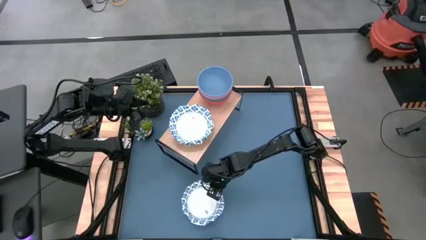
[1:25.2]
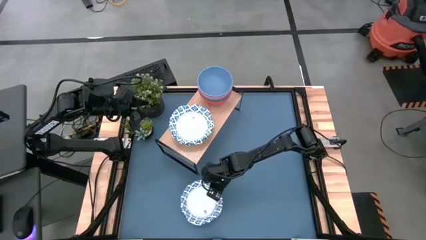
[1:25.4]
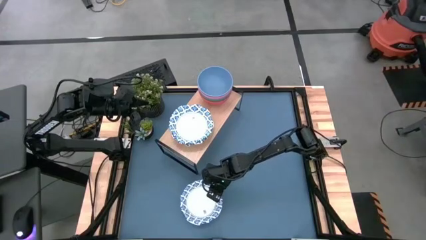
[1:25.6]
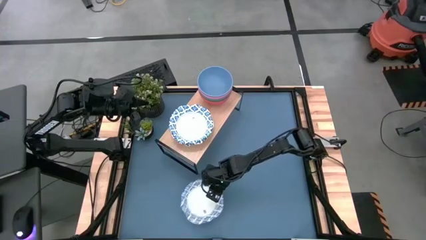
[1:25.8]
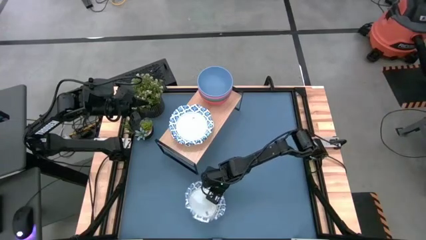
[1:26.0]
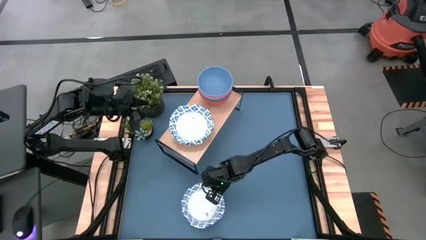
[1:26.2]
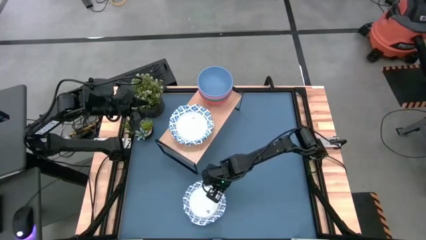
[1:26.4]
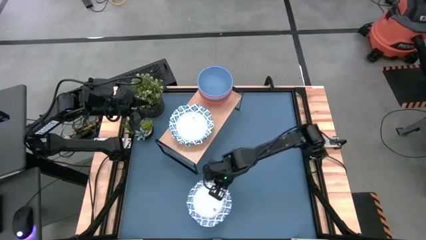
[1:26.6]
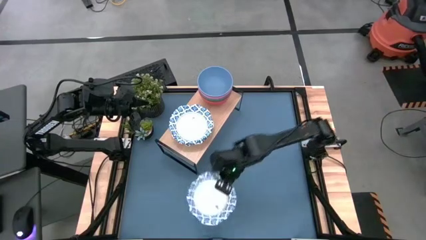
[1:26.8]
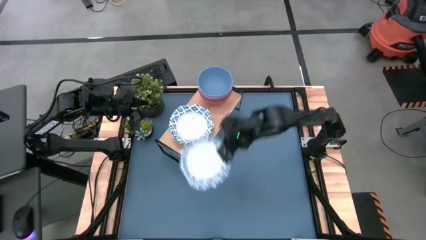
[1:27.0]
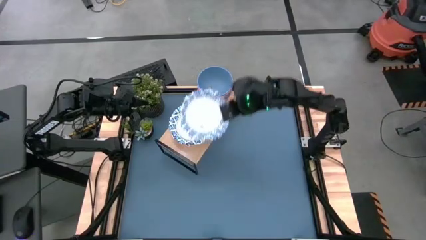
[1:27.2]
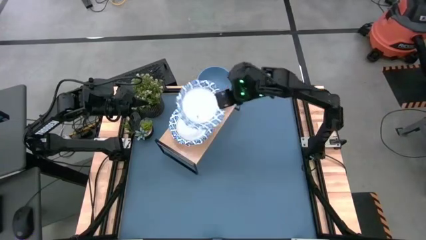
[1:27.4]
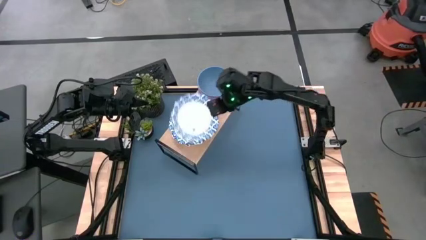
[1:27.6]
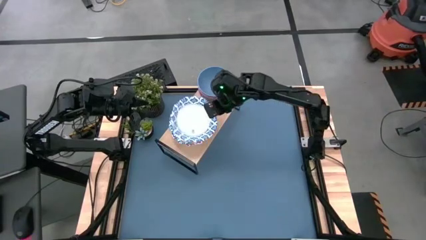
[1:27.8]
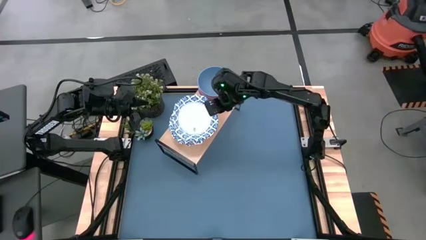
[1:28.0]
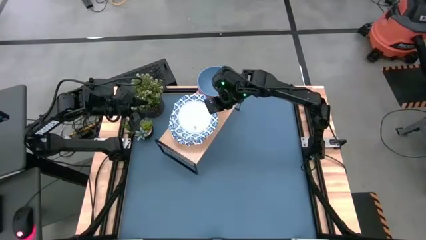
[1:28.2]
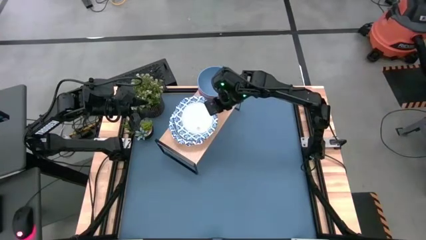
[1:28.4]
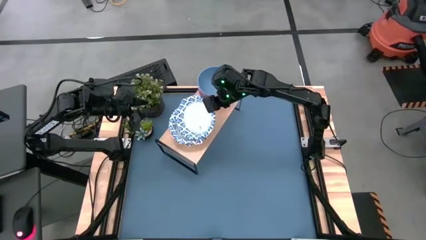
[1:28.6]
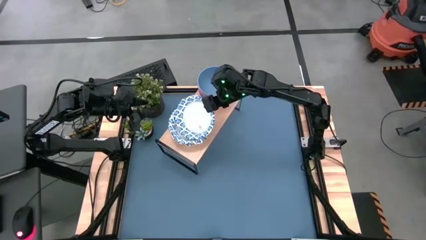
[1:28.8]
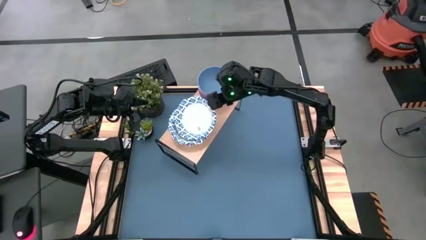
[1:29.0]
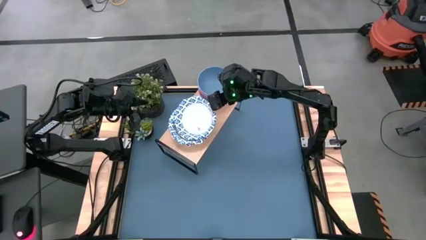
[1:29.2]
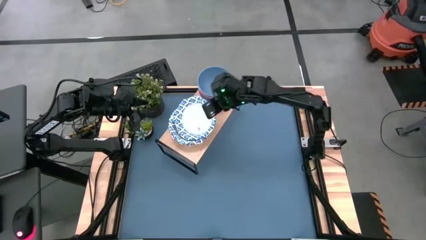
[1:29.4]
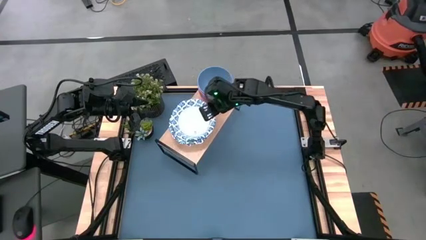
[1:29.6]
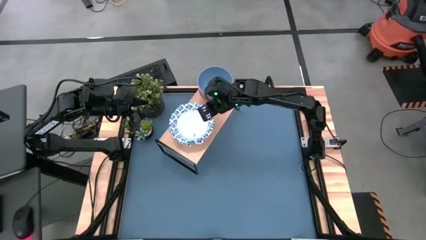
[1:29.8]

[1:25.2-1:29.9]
Task: Place and stack bowls onto a shelf
Stack the white bowl on top of the other white bowl on the shelf

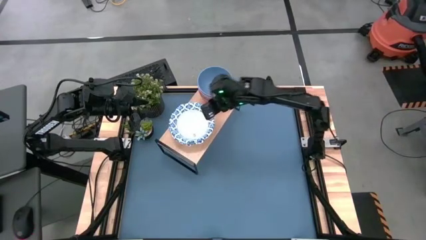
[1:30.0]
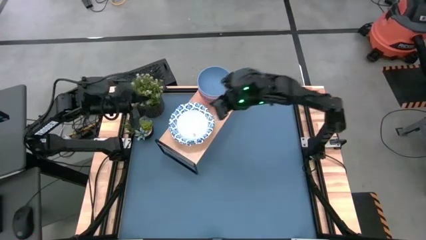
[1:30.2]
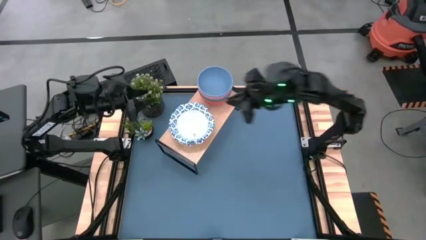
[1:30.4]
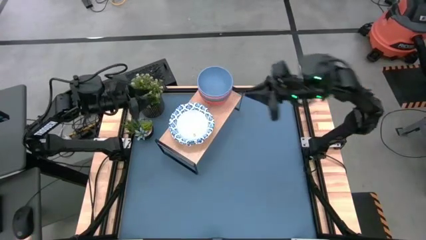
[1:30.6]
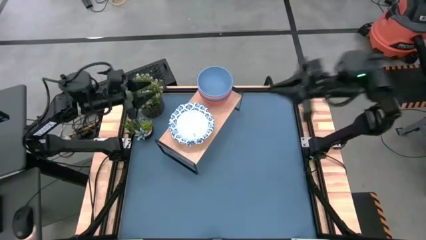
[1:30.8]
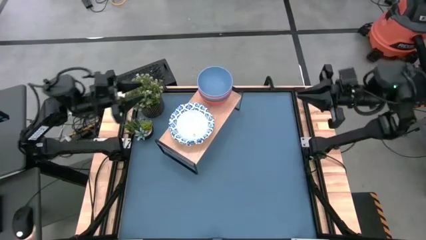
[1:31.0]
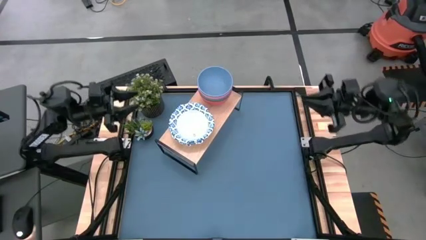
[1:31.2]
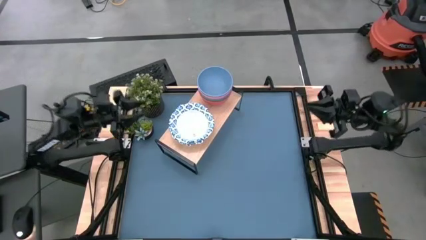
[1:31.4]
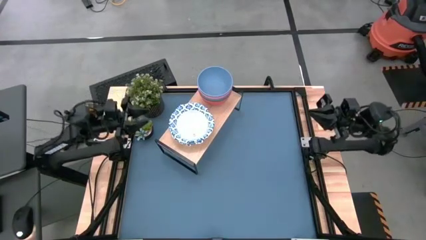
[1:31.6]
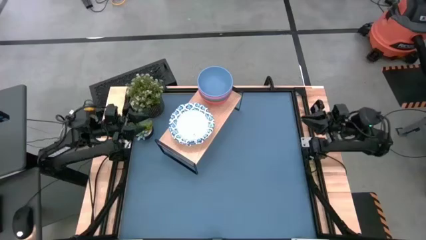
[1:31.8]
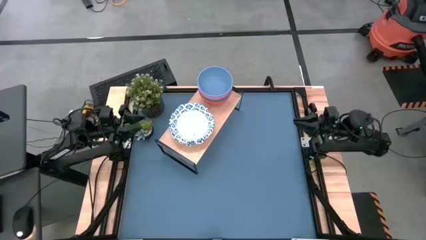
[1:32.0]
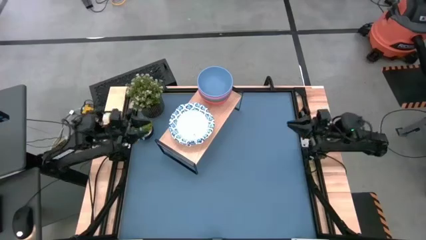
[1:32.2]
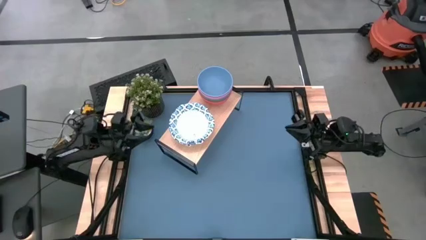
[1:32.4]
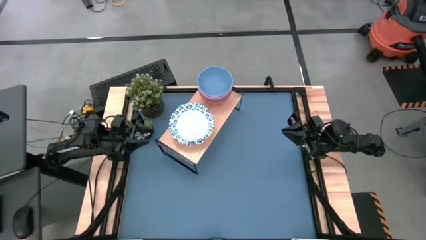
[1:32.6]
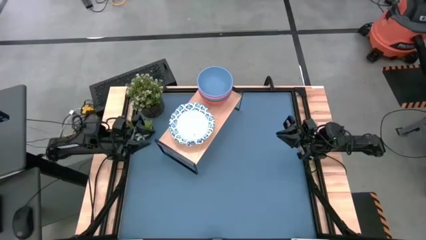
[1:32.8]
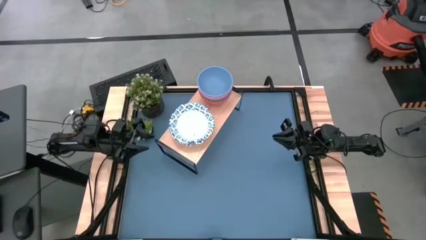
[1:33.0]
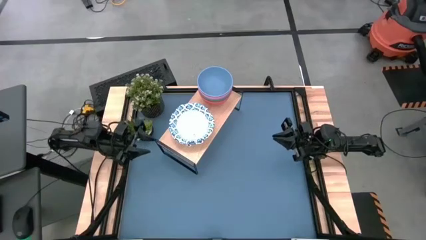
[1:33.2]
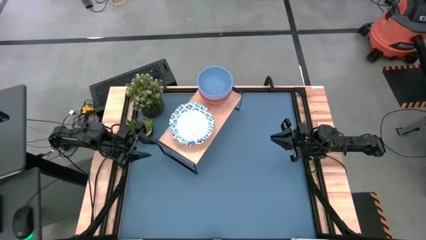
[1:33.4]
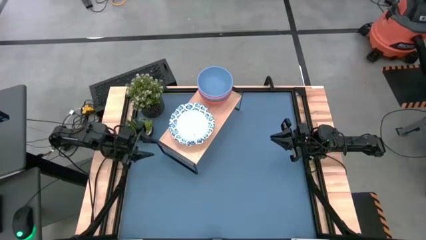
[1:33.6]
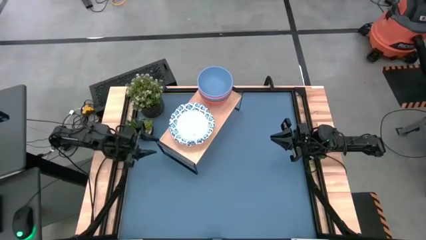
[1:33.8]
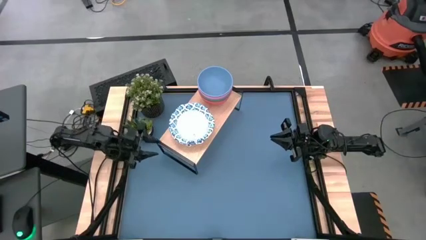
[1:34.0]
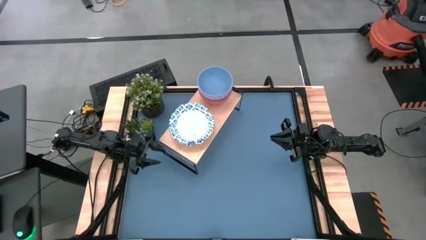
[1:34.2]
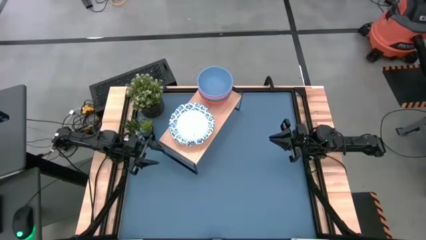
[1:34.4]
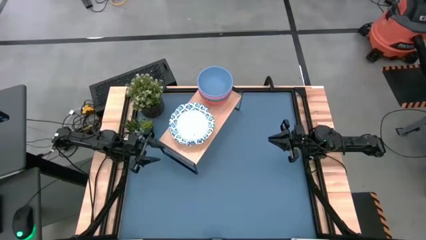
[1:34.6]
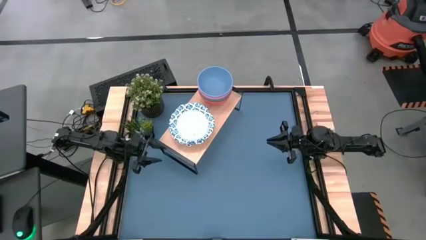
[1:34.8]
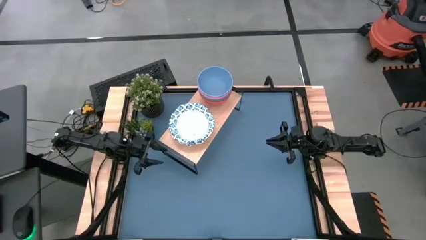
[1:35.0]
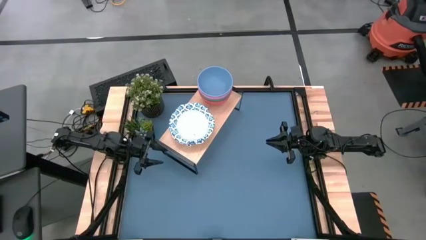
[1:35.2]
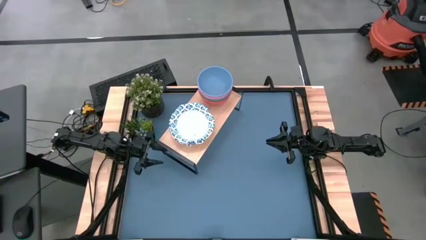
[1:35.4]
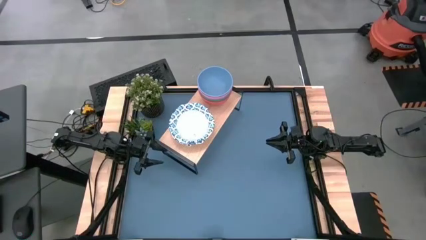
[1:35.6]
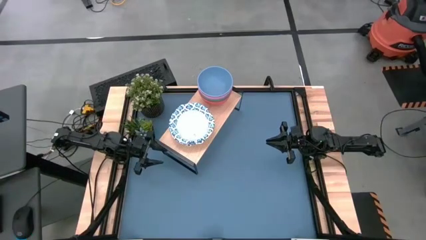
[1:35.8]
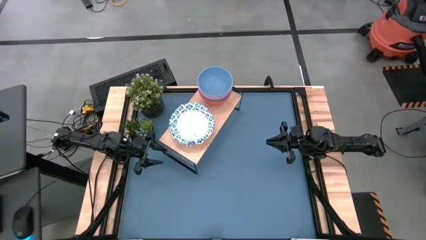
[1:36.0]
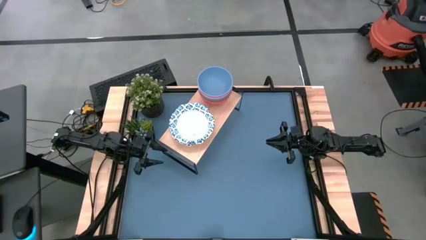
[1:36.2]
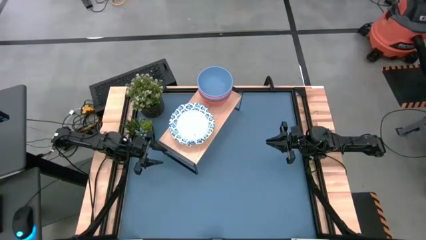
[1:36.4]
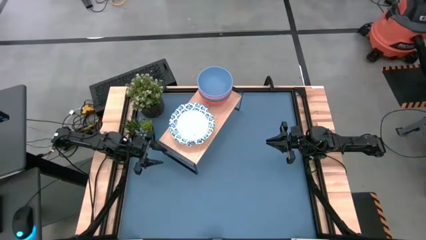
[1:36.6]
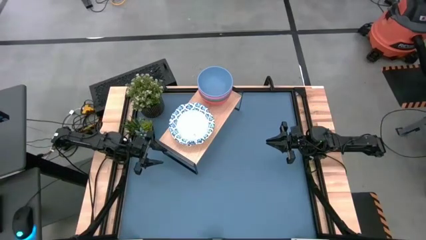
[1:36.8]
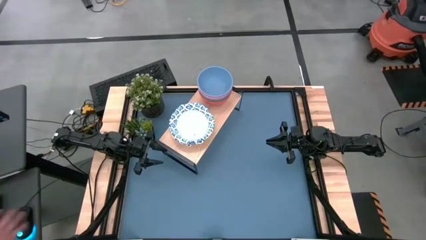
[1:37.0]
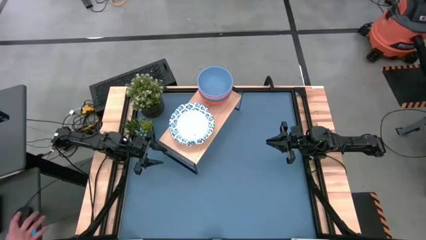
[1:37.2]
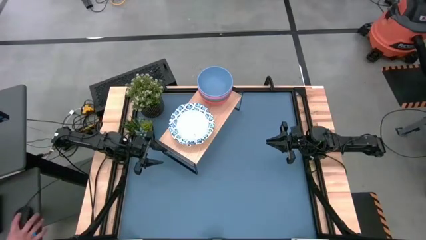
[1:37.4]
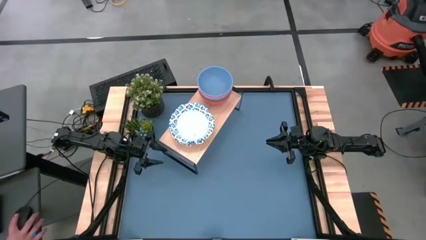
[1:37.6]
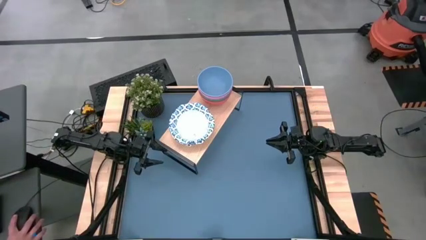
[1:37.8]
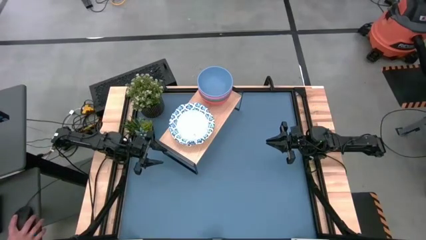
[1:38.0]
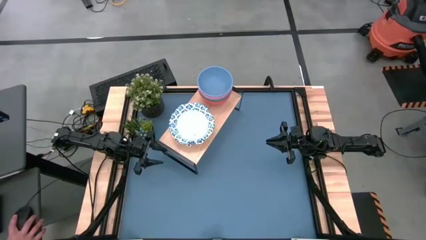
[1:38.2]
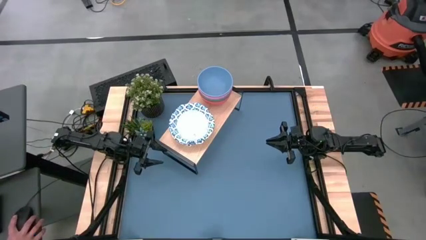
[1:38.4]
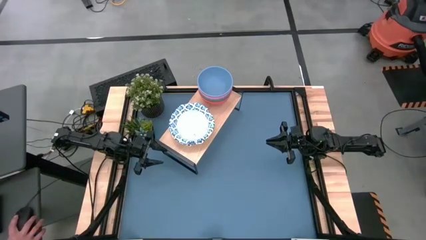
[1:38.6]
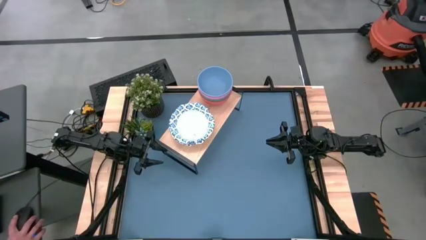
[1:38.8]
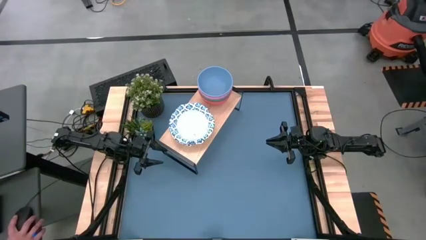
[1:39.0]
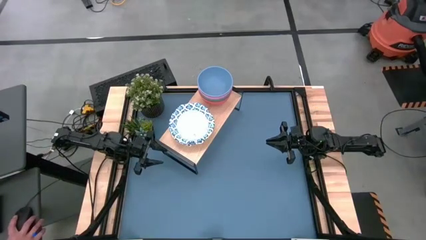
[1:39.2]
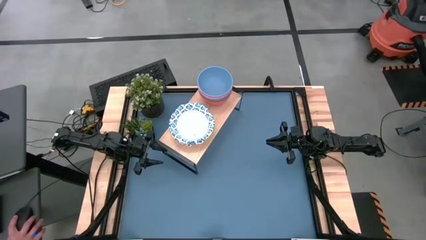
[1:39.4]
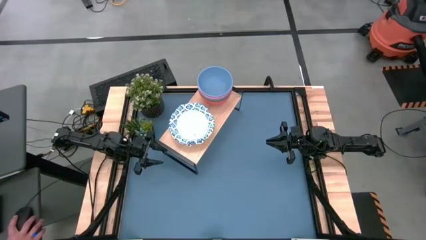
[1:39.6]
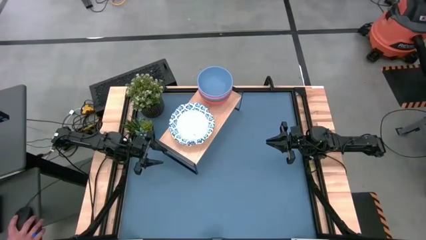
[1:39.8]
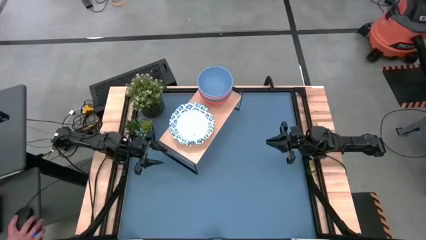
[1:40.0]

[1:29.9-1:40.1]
Return to Home Position
